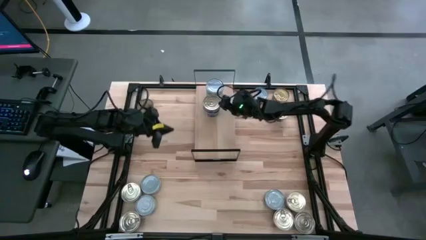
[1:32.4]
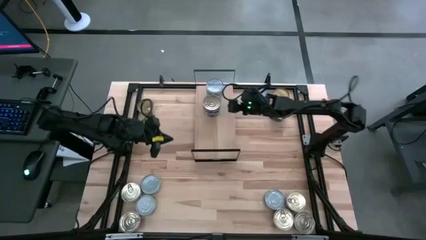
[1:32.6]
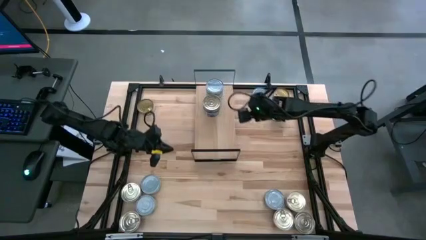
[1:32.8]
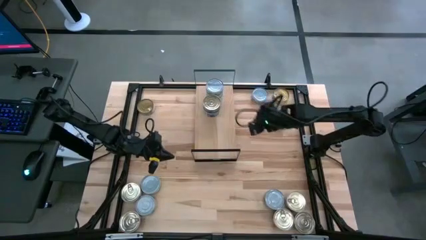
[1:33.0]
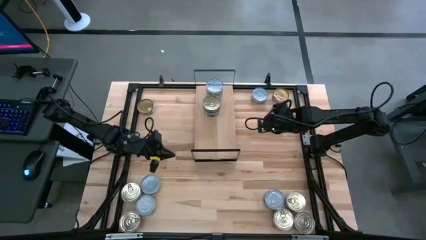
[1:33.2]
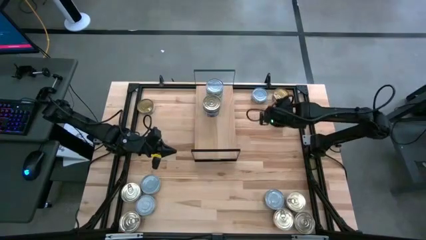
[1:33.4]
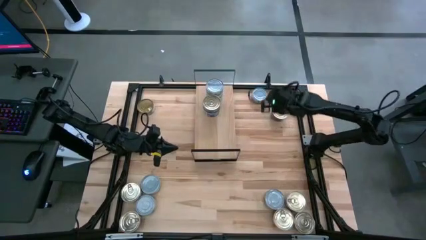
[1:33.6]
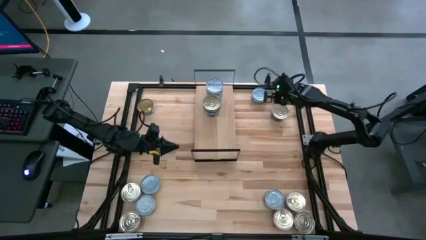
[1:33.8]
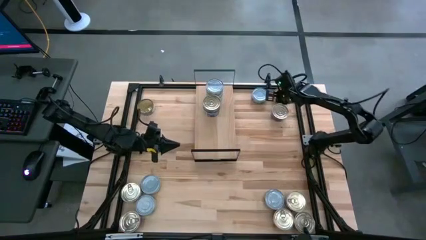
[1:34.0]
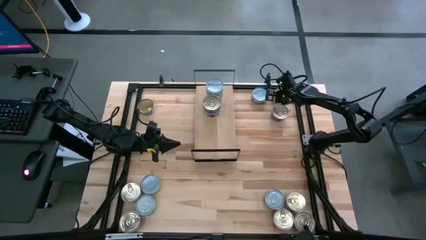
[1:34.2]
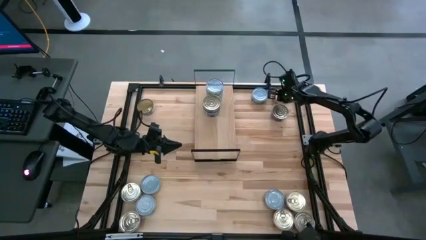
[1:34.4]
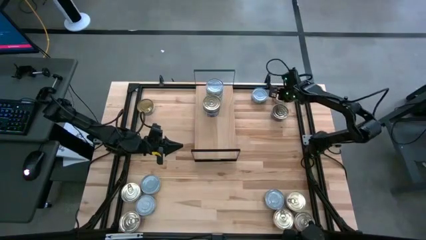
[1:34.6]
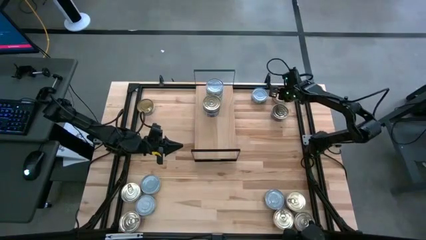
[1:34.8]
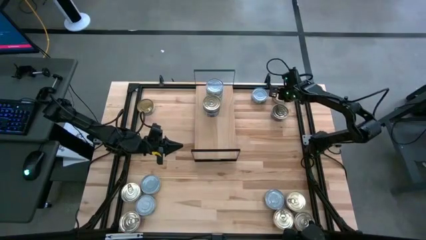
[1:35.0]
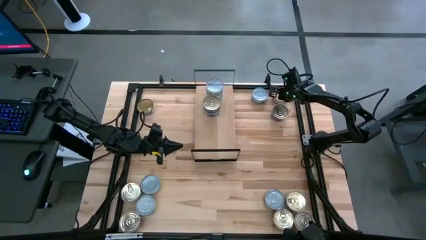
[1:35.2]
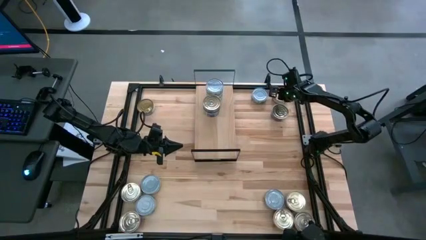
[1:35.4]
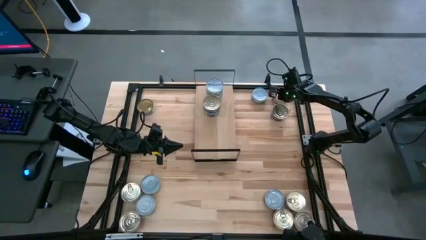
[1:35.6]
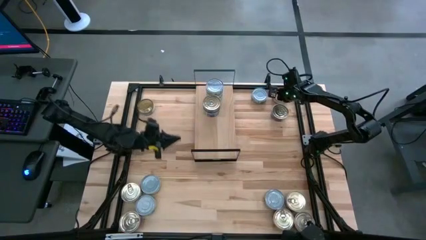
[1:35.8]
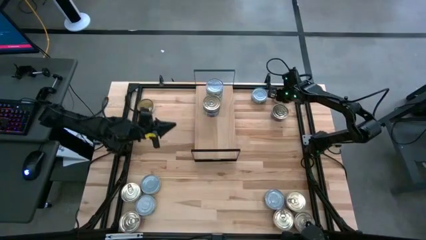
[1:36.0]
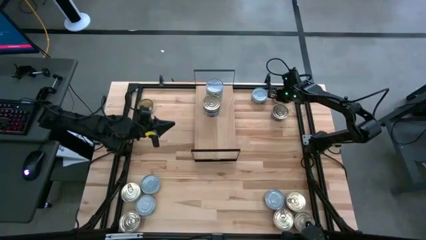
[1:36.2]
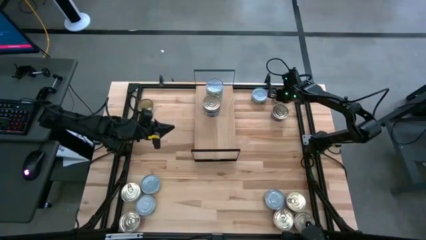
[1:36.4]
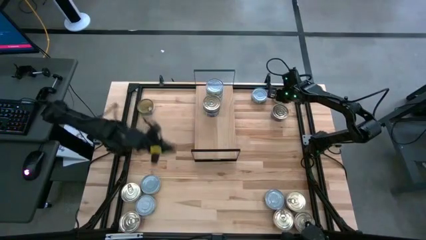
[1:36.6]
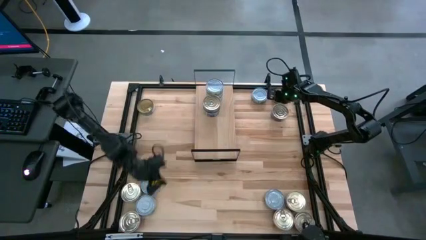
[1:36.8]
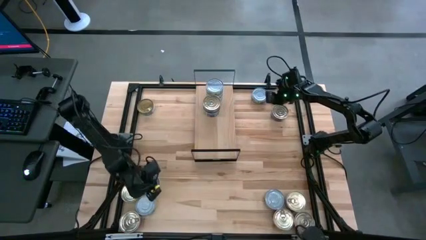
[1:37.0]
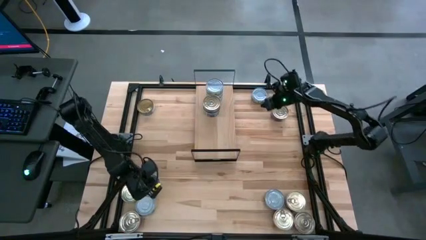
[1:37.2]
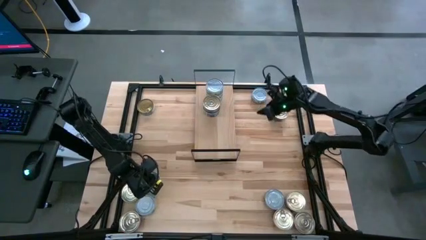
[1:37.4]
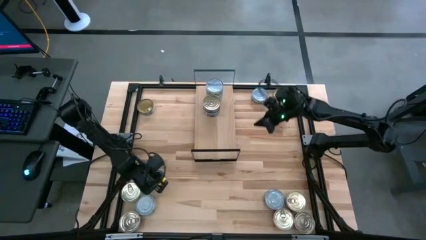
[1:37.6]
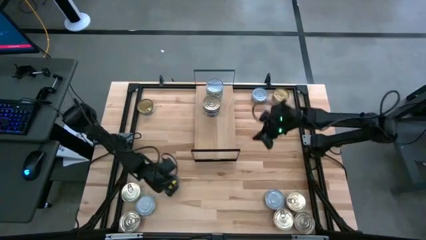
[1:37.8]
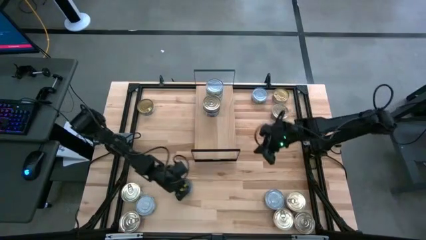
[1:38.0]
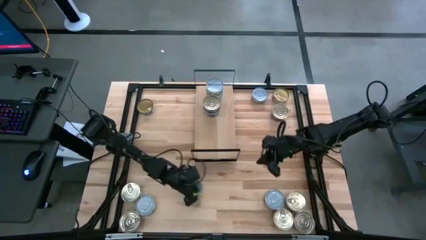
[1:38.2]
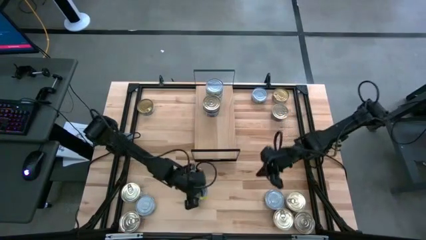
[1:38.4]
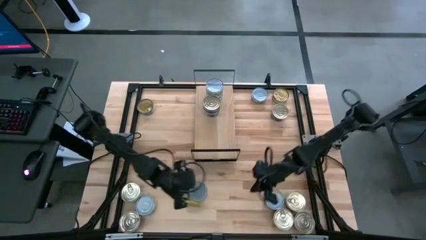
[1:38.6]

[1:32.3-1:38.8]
Task: Stack canned seafood by type on shelf
Move the green tuna can to the bottom middle of the table

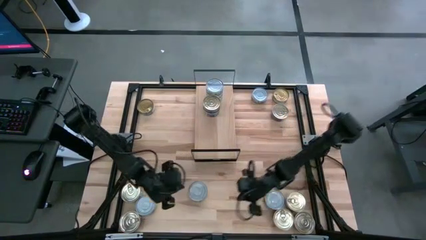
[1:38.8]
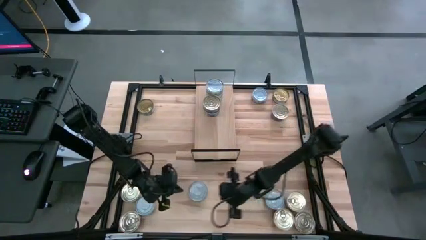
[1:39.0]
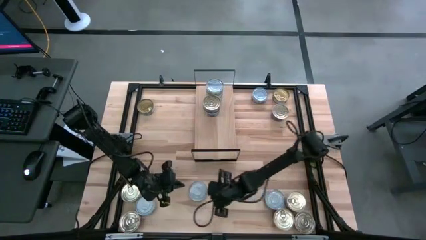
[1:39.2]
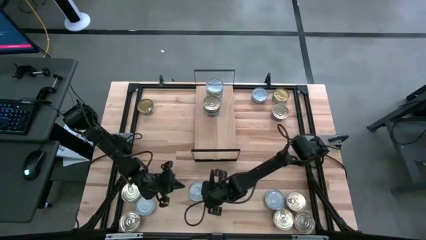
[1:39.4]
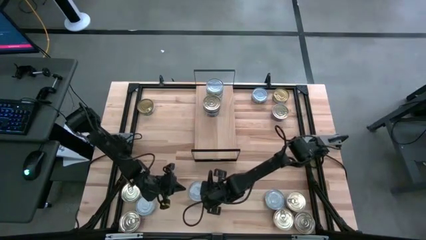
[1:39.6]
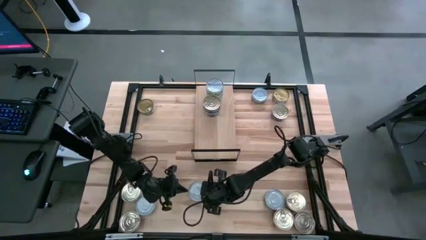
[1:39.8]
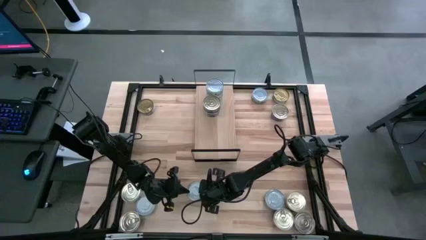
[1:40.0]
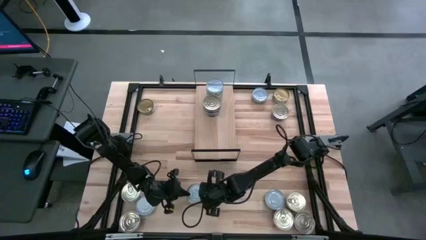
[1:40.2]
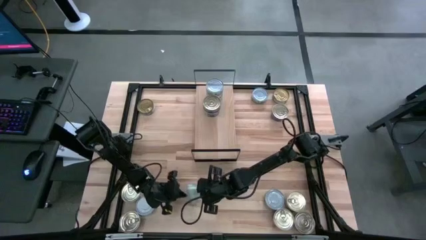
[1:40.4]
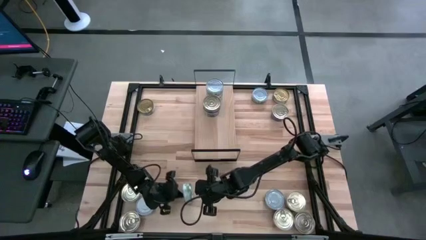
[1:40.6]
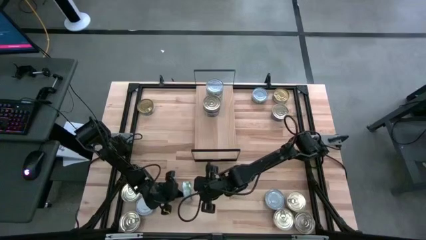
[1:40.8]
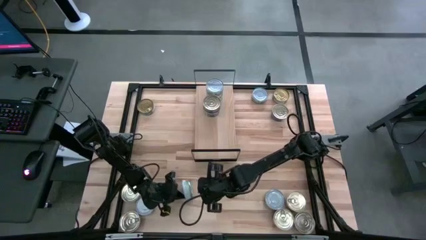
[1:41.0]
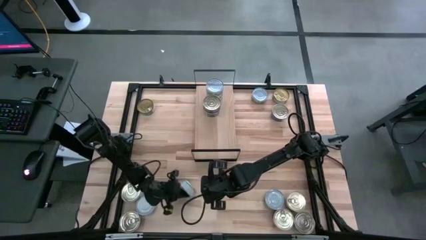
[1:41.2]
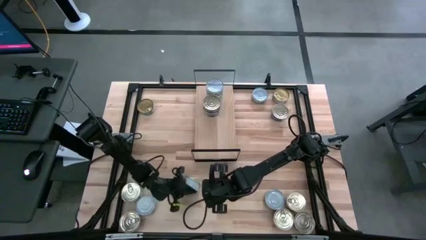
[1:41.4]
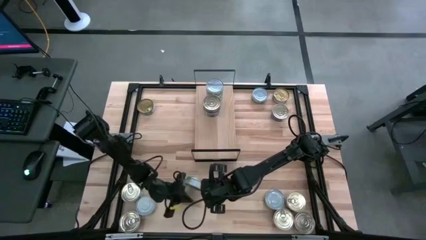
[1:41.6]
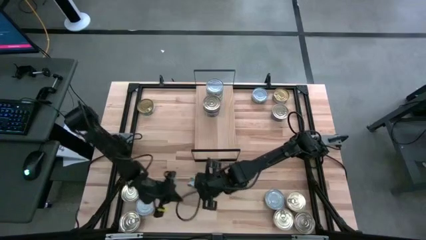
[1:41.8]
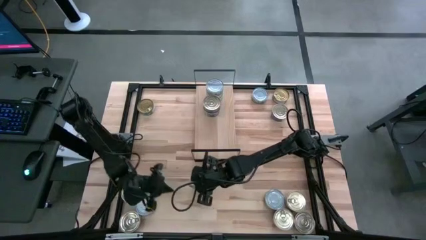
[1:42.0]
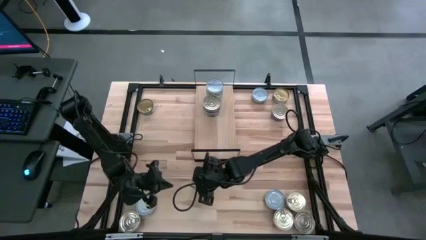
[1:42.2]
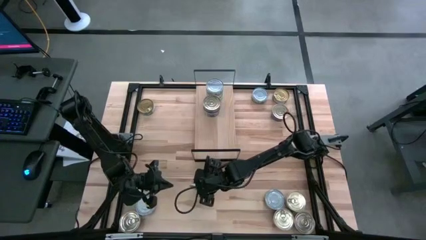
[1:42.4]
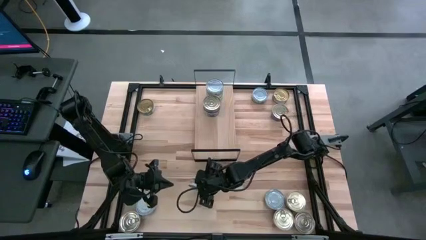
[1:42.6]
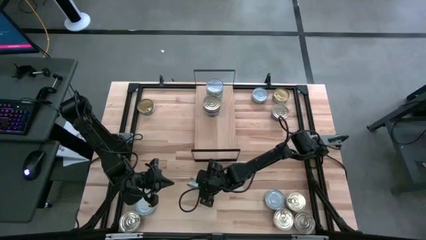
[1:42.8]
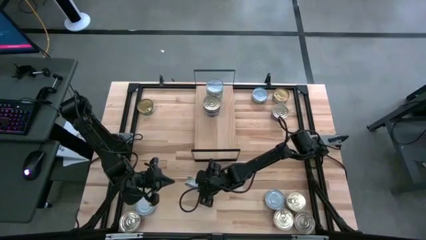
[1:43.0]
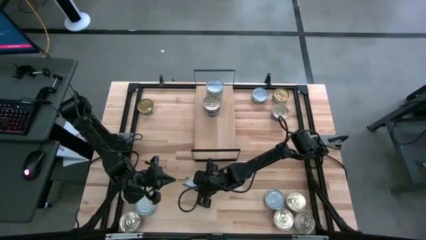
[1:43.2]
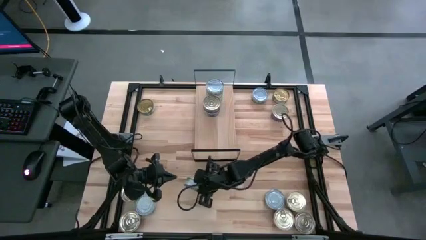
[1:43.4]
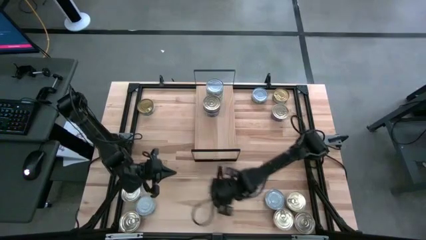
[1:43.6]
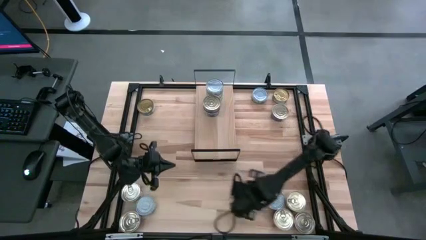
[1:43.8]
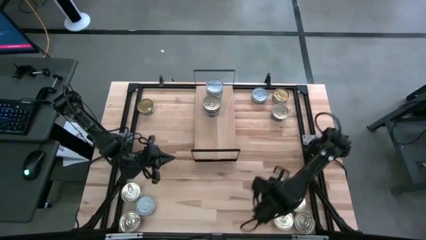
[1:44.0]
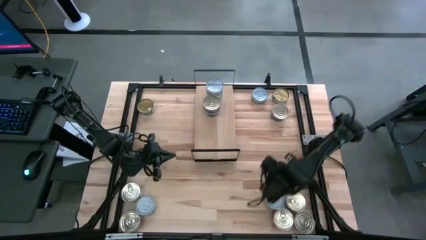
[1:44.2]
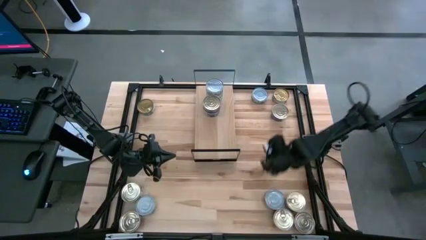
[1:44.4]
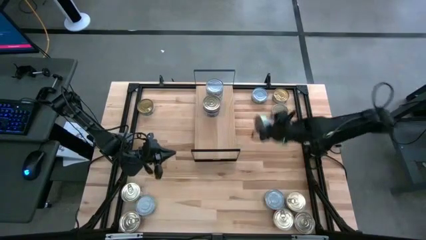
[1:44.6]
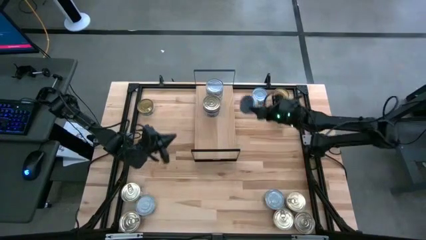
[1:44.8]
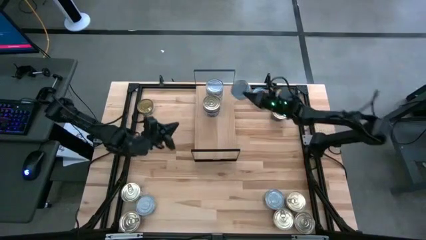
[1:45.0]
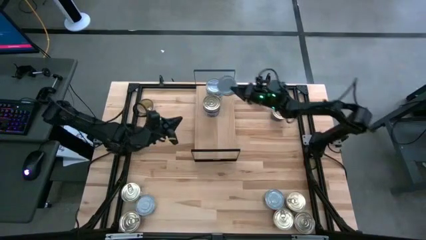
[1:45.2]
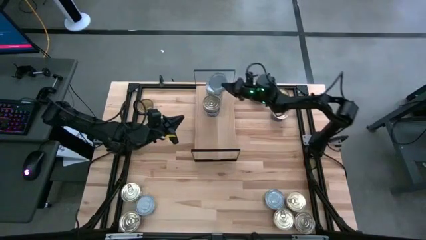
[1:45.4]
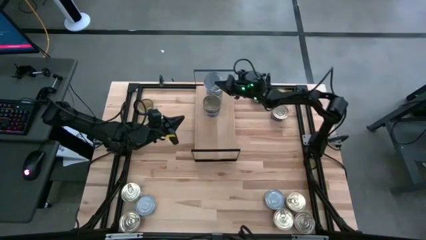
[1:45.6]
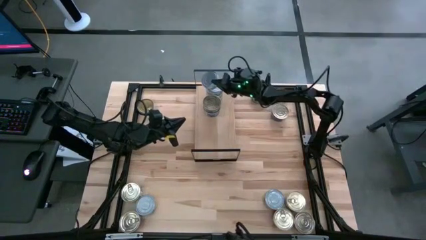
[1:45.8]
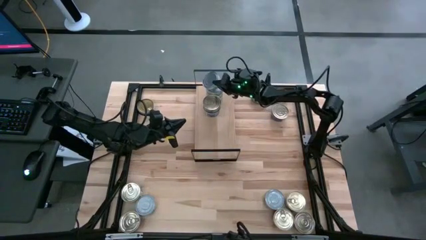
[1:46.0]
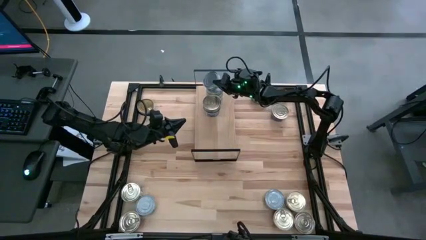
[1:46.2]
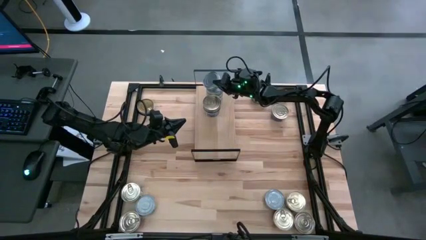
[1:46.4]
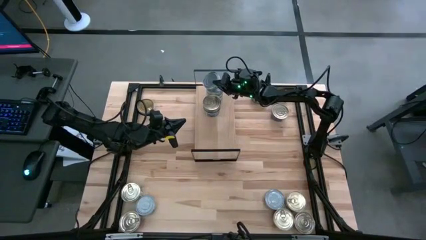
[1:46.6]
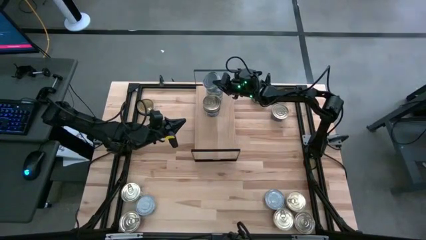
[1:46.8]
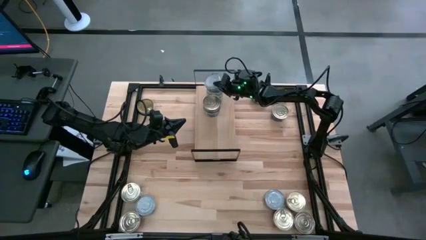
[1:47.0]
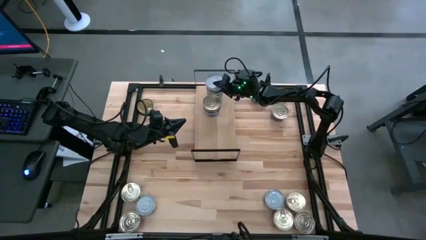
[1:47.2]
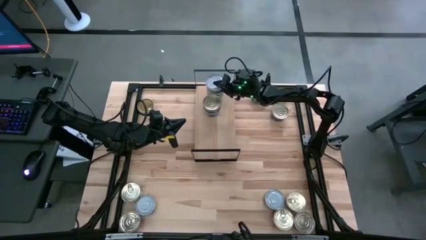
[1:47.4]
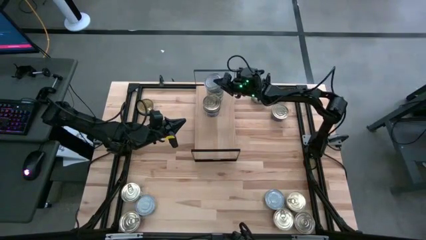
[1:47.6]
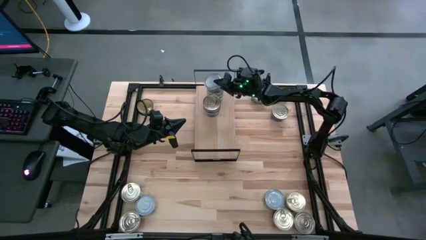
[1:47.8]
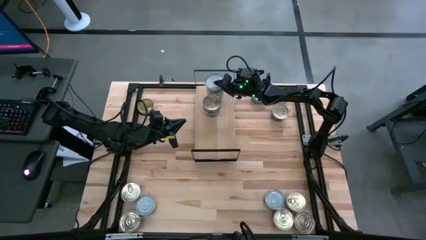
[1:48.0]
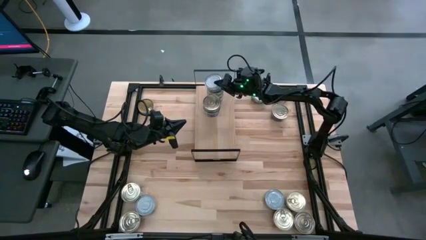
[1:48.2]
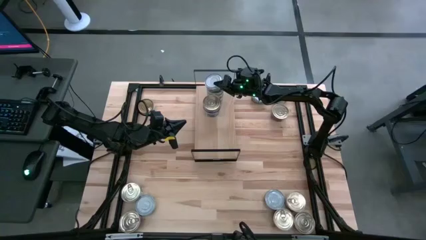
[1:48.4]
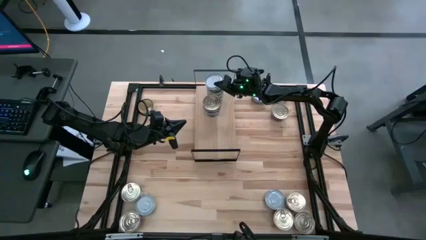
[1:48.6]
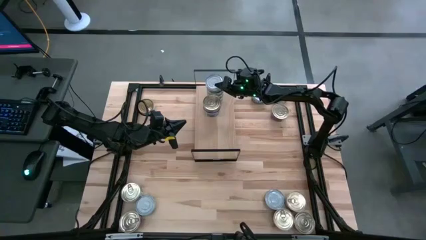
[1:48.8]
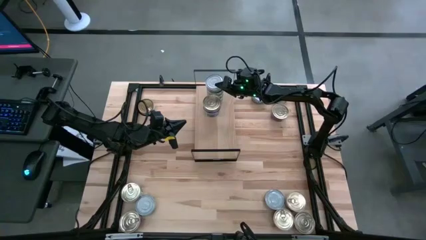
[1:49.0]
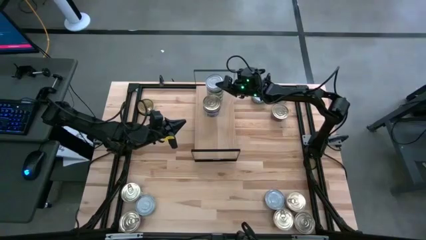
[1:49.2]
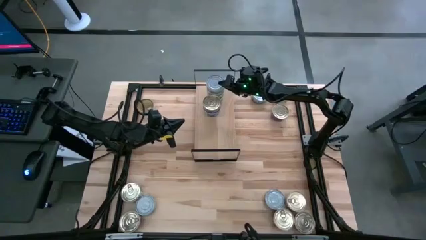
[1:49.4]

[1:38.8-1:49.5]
Stack the green tuna can on top of the green tuna can on the shelf
